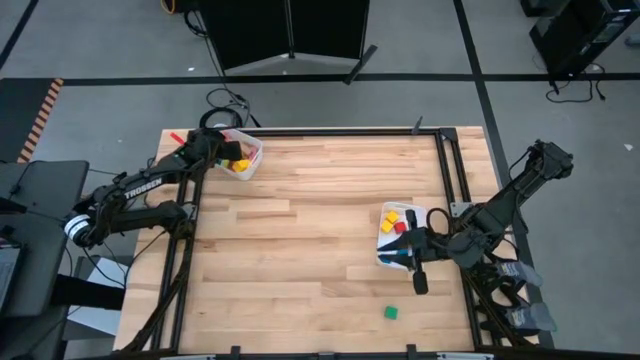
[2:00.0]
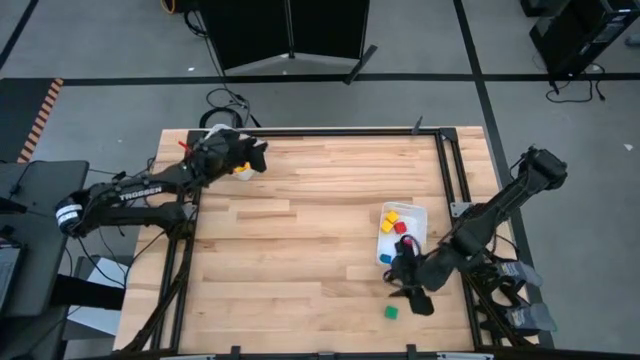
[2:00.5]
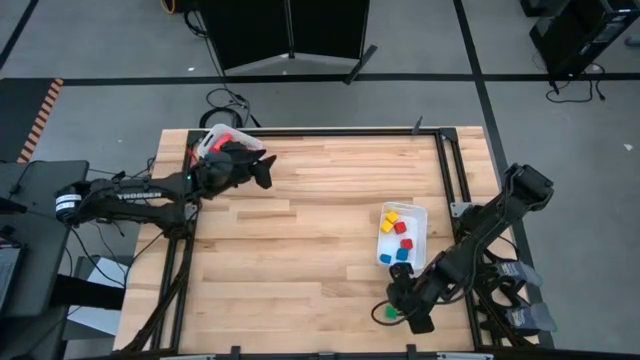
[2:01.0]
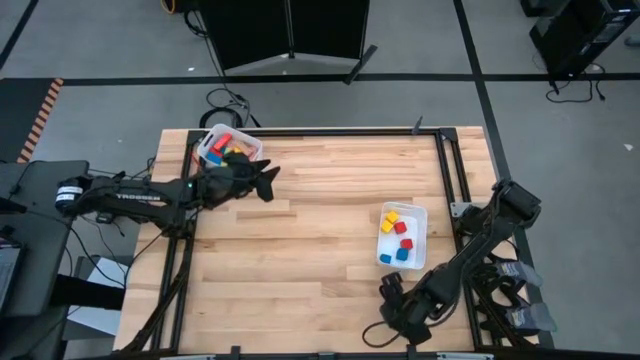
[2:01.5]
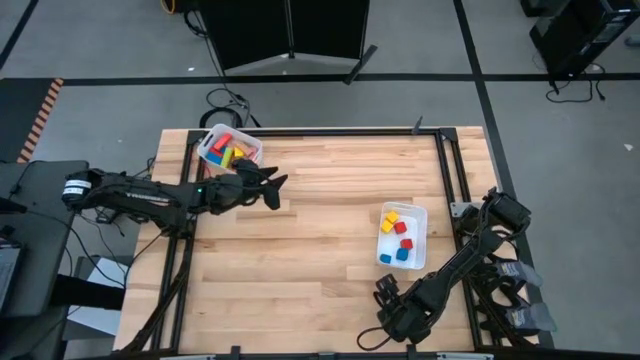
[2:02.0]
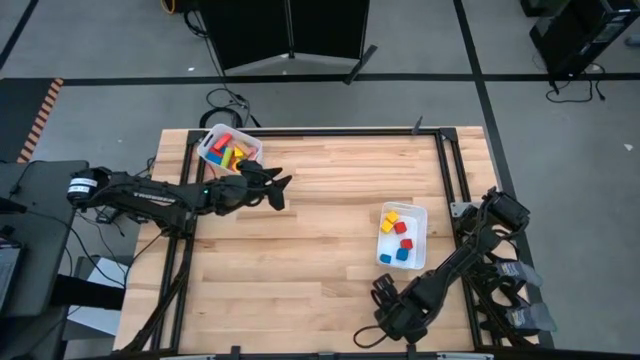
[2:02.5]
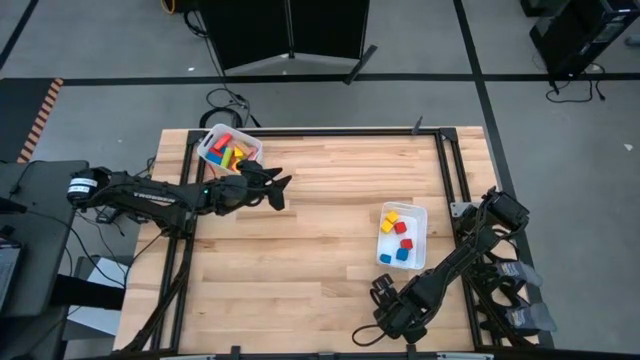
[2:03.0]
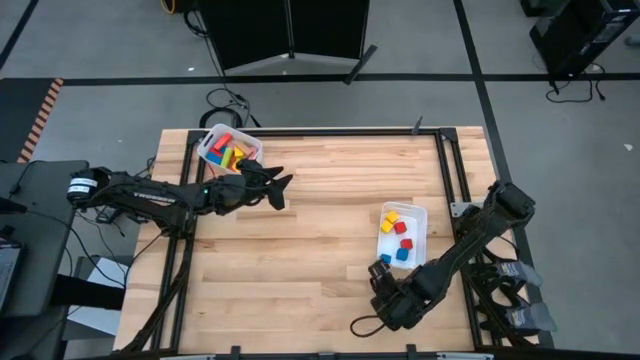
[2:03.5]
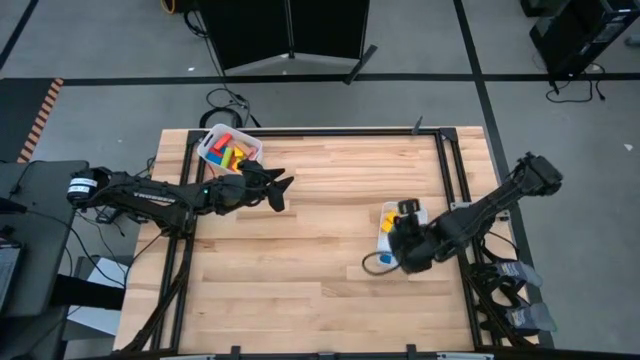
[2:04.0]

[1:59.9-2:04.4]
Task: Sort blocks by size
Put the green cube block into the bottom white bin

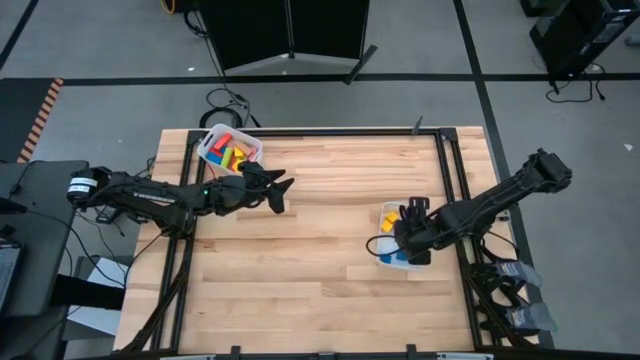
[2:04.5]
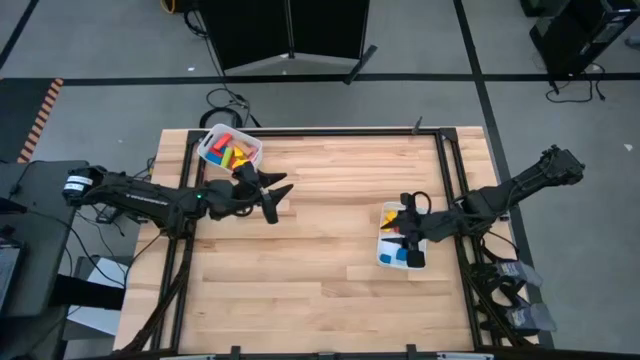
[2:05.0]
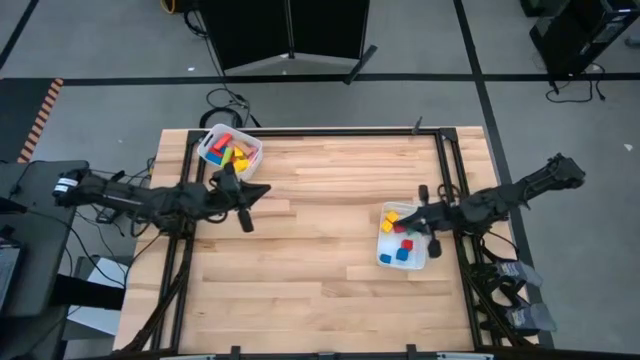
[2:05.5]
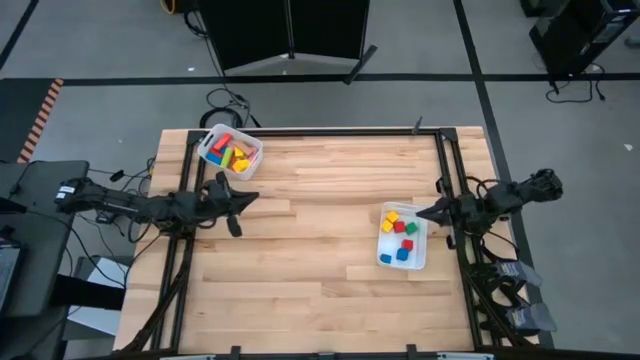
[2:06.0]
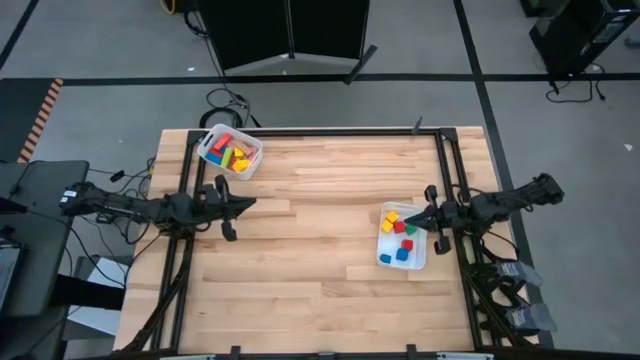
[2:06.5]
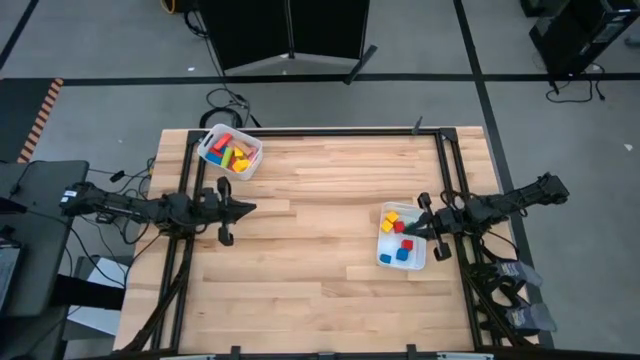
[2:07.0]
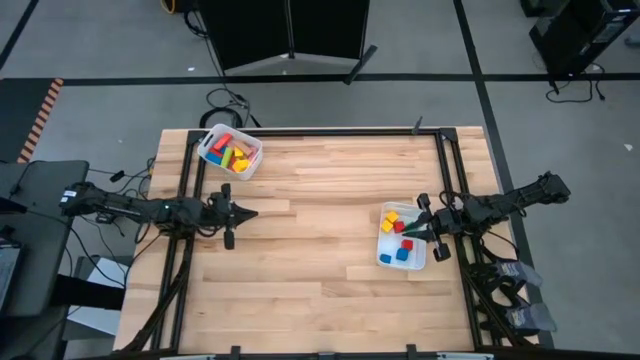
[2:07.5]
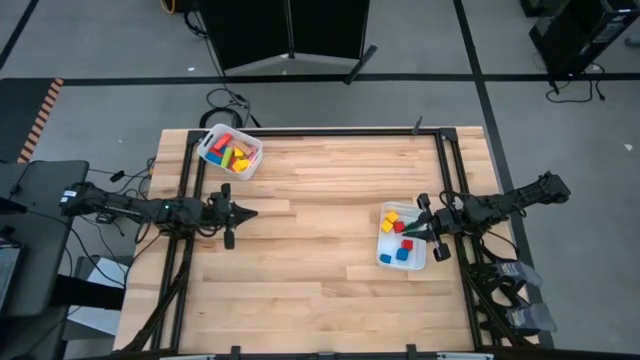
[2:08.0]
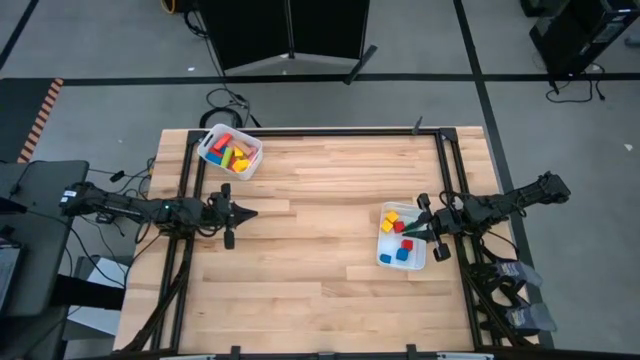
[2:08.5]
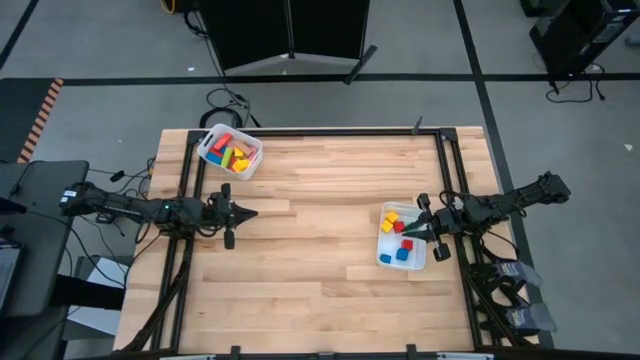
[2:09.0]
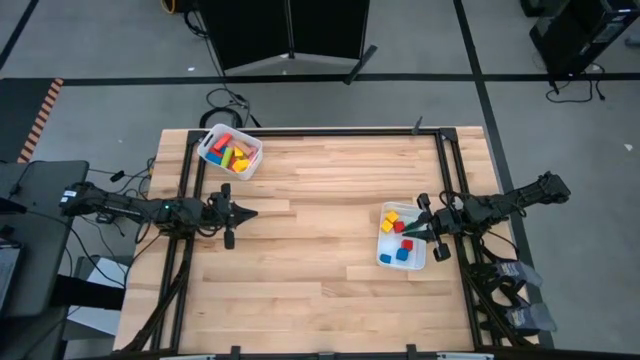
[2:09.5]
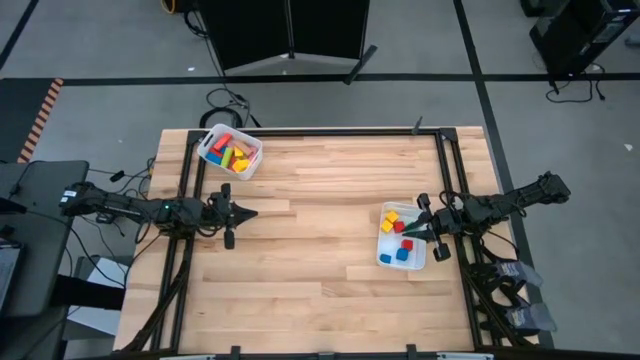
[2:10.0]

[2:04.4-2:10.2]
Return to Home Position

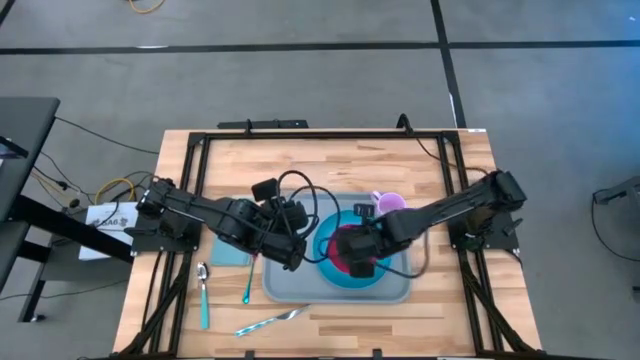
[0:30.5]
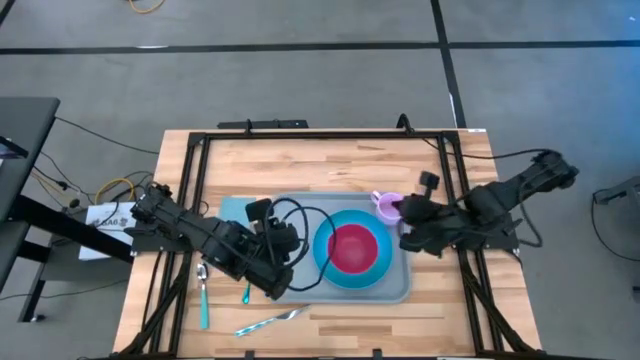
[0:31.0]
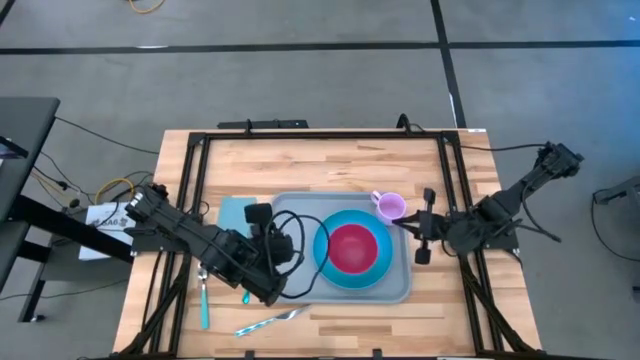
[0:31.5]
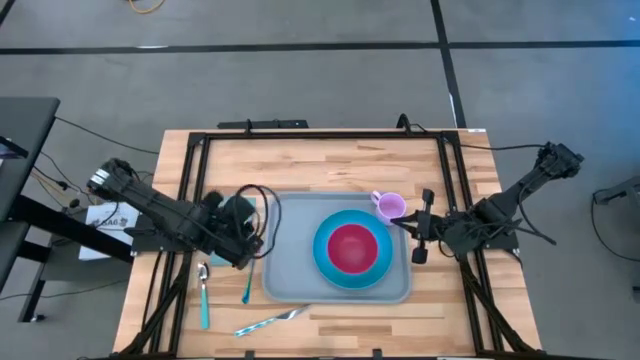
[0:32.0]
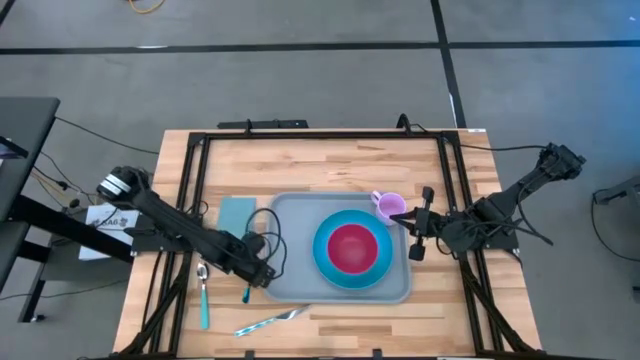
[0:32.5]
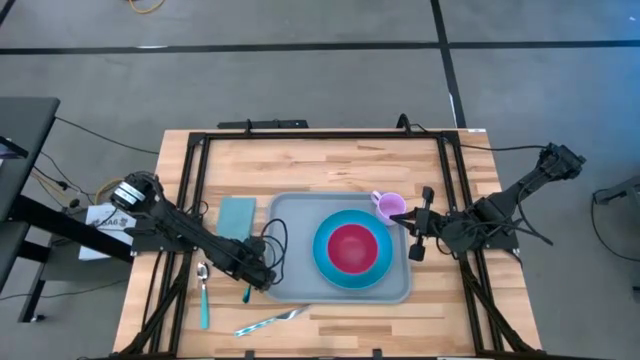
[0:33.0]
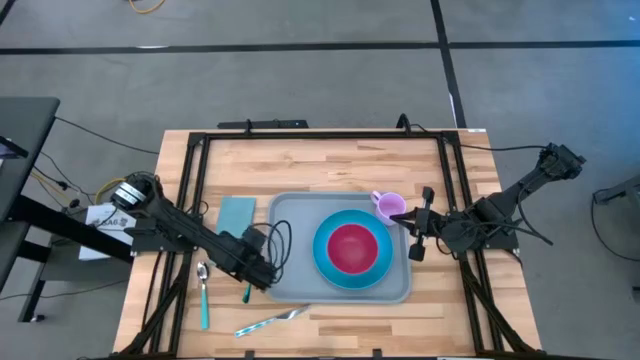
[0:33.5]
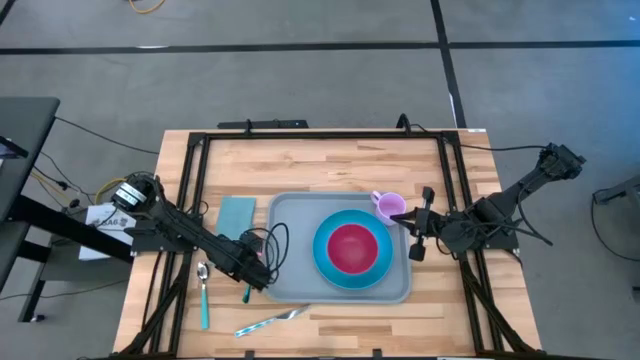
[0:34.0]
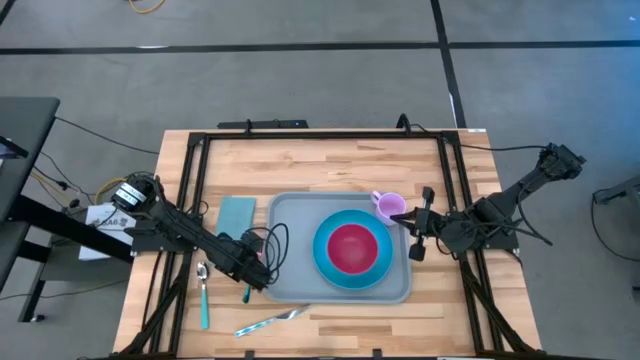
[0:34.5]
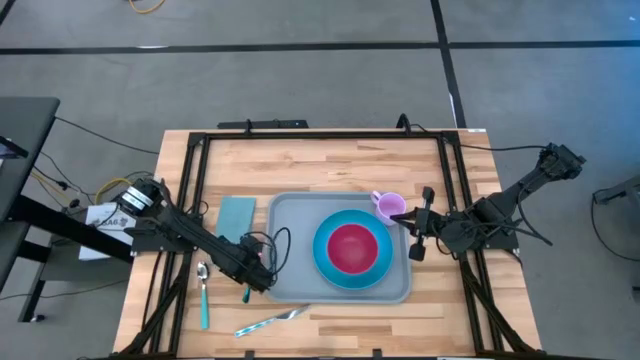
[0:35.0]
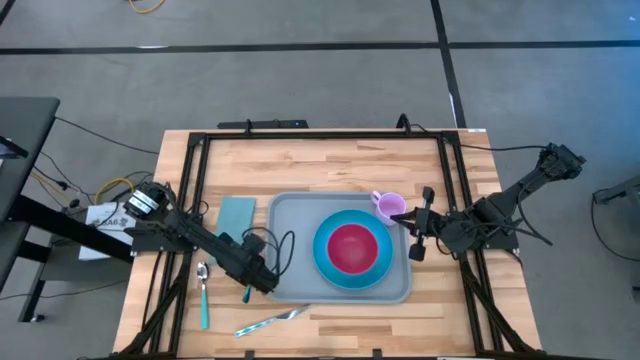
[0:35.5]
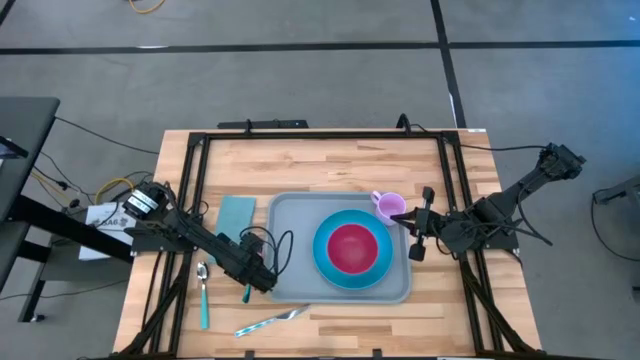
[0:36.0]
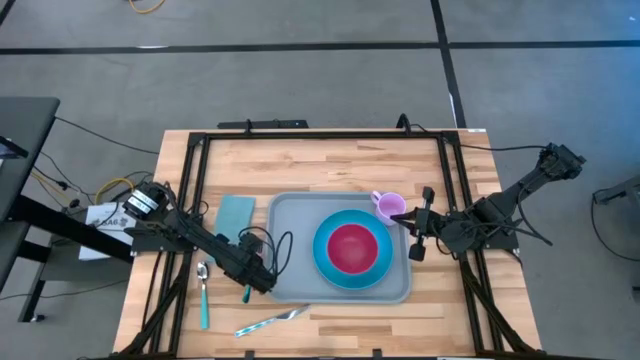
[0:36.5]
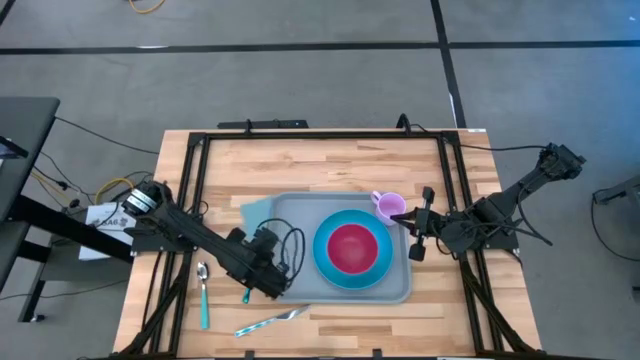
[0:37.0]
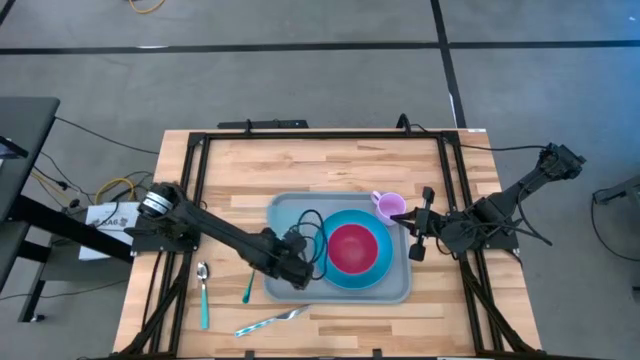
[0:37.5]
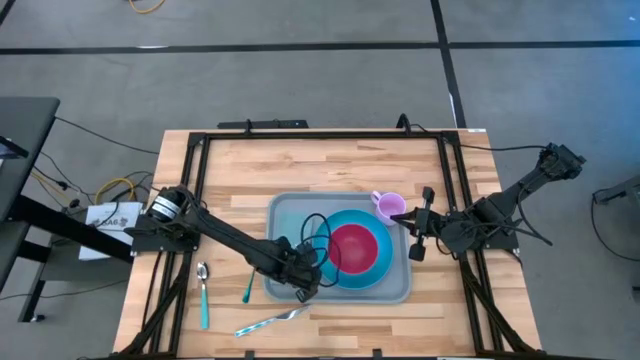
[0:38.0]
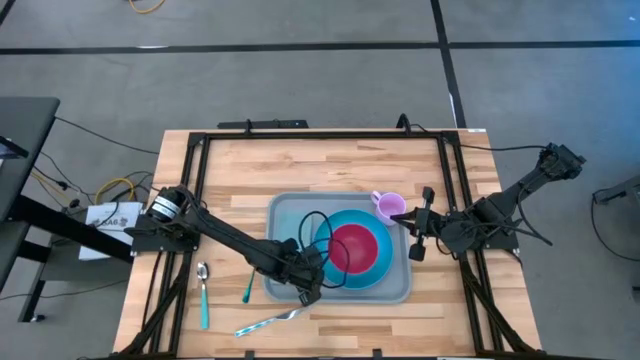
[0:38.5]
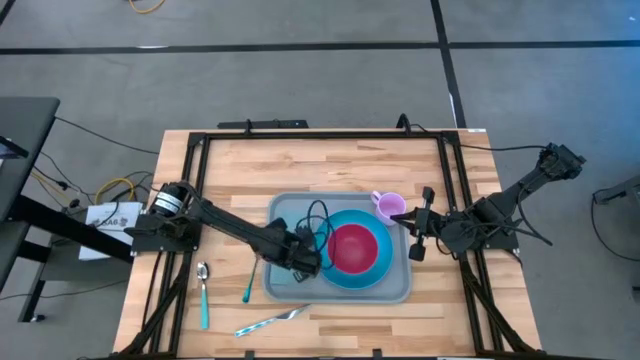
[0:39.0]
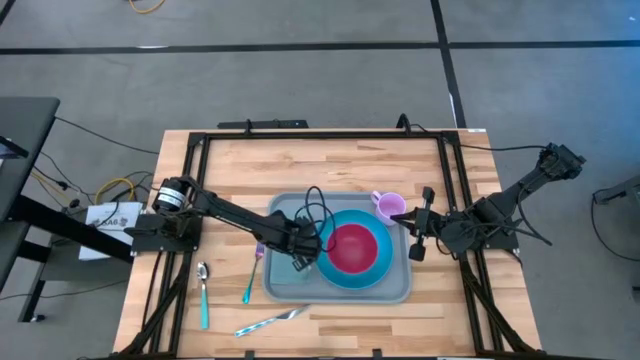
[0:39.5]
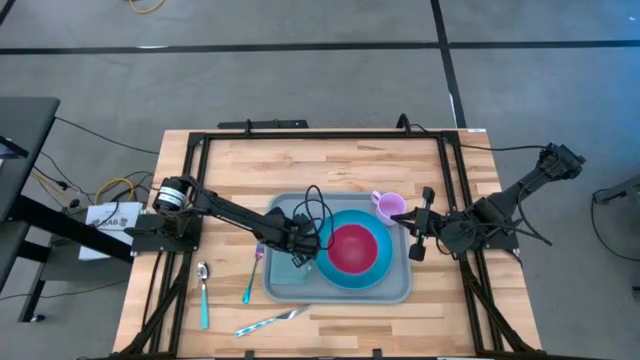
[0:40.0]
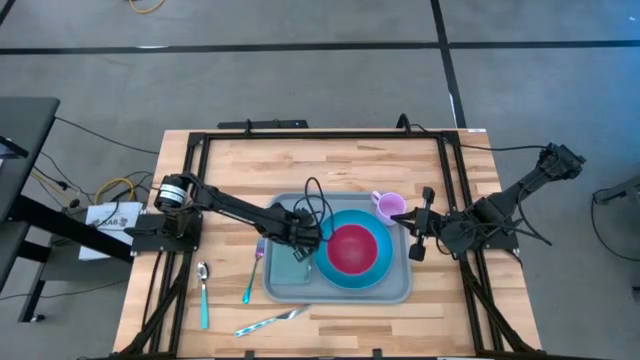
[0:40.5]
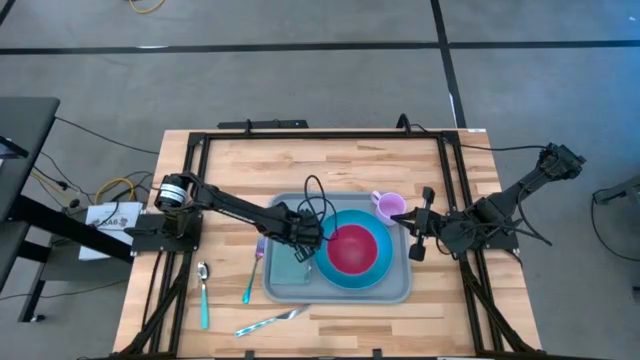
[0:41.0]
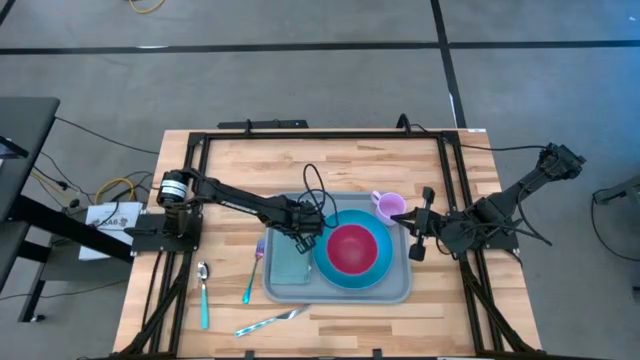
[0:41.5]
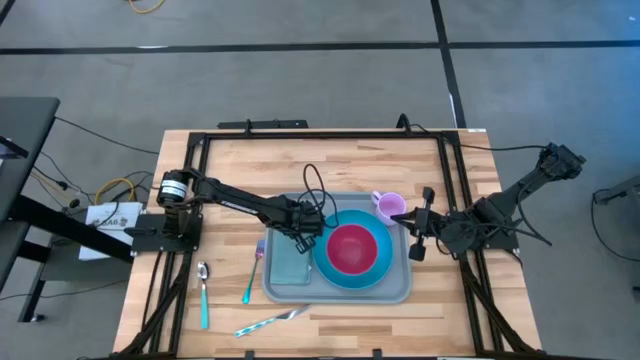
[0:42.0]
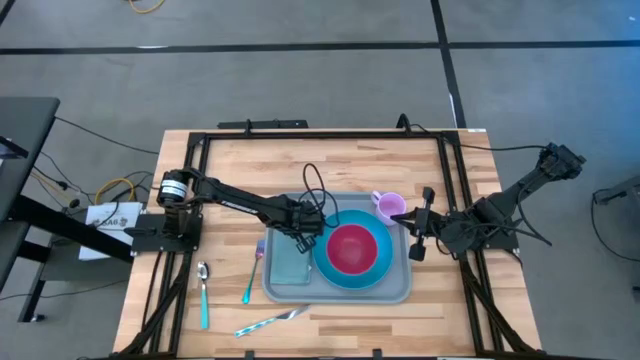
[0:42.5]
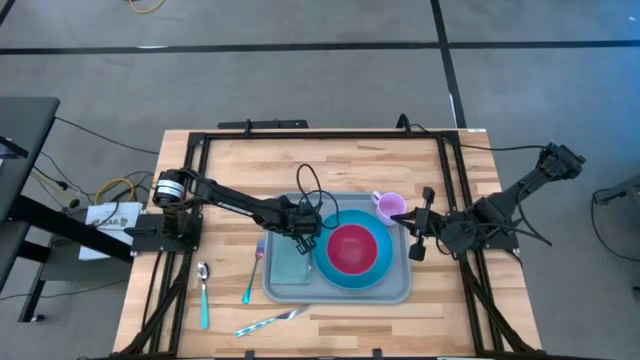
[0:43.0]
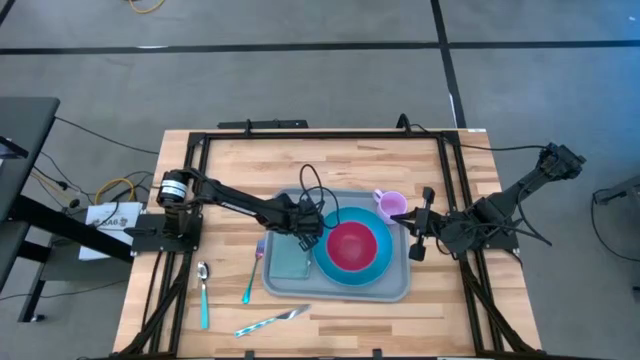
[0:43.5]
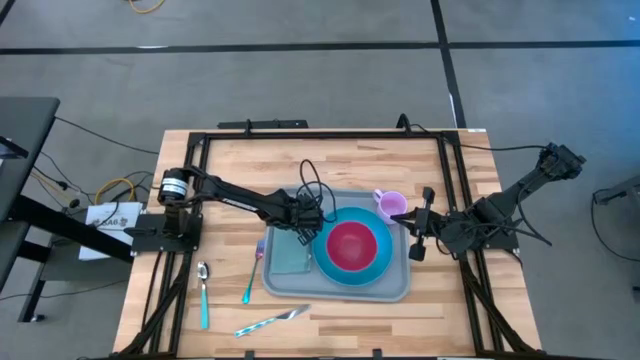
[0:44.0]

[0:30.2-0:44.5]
Task: Set up tray
Put the blue napkin on the gray serving tray to the left of the blue plate
